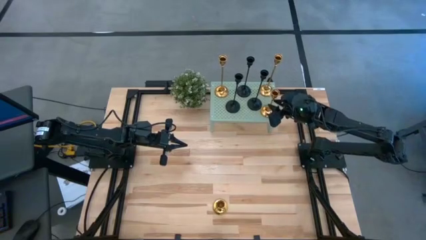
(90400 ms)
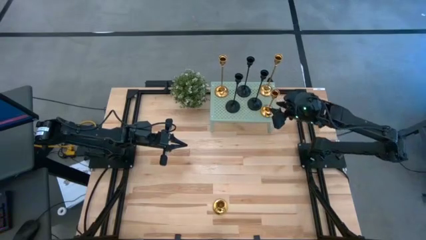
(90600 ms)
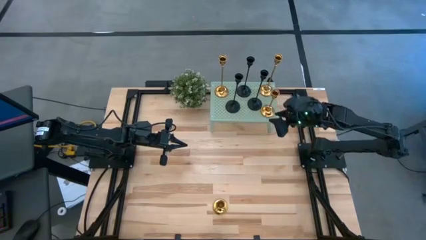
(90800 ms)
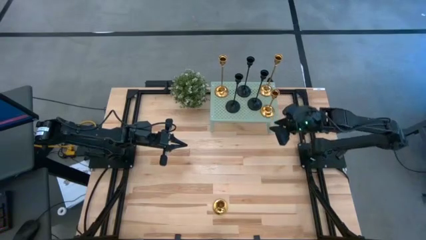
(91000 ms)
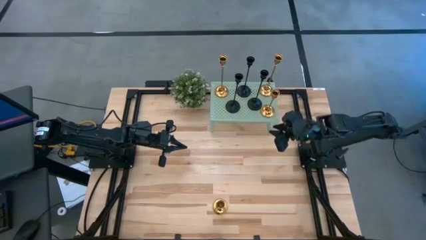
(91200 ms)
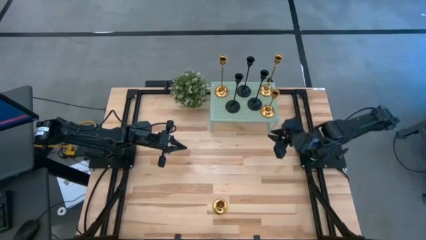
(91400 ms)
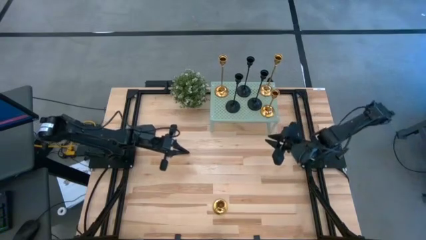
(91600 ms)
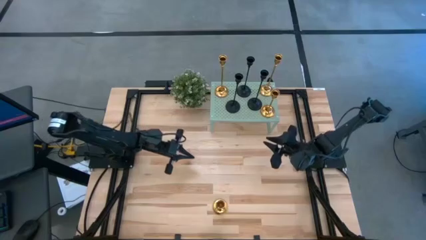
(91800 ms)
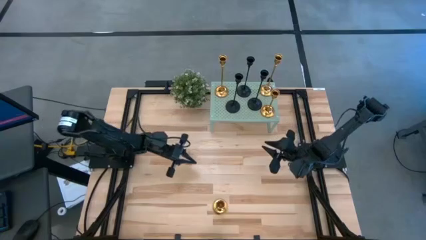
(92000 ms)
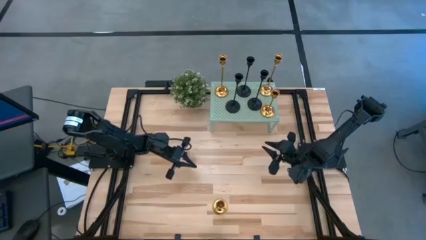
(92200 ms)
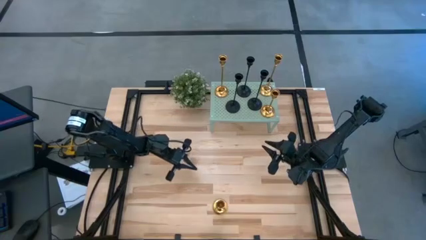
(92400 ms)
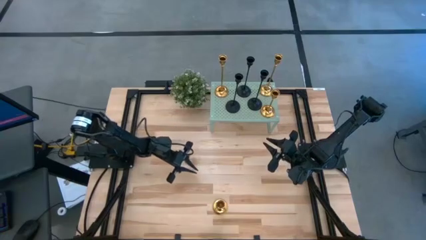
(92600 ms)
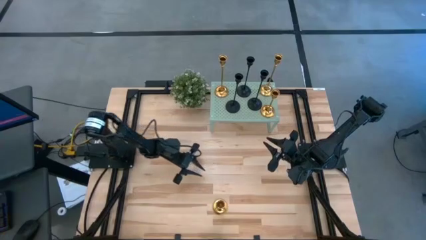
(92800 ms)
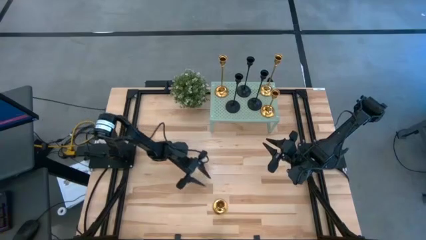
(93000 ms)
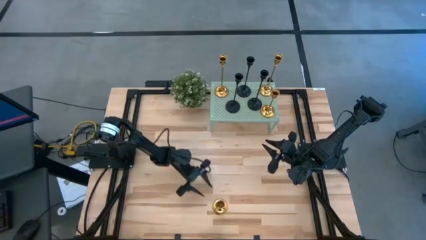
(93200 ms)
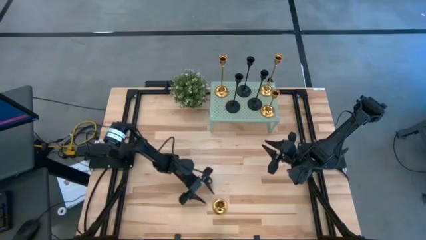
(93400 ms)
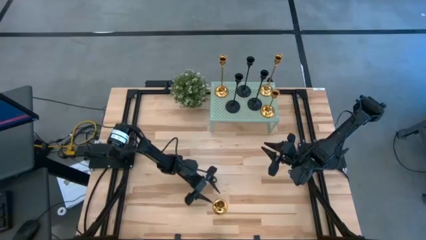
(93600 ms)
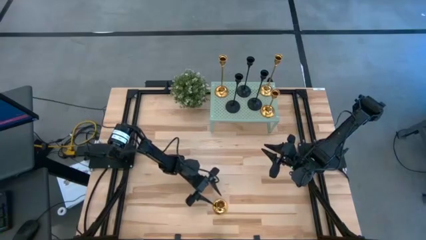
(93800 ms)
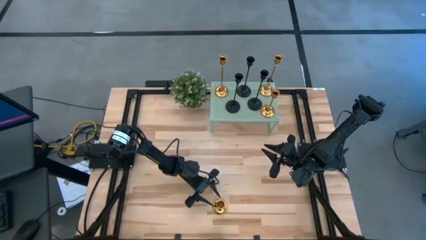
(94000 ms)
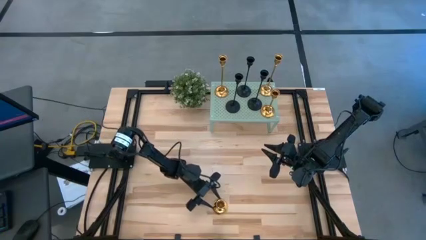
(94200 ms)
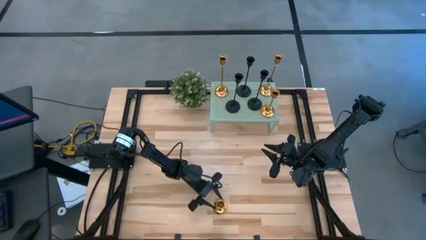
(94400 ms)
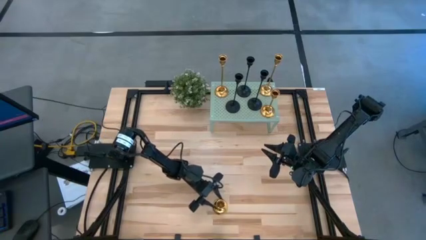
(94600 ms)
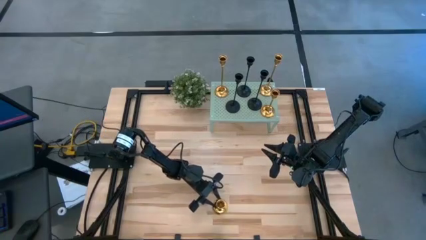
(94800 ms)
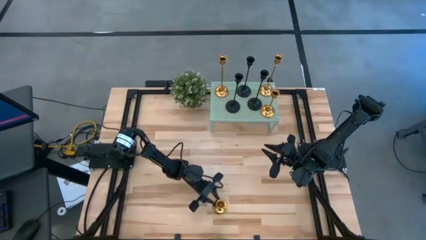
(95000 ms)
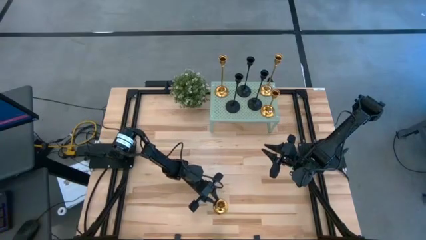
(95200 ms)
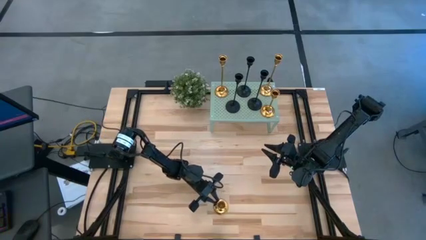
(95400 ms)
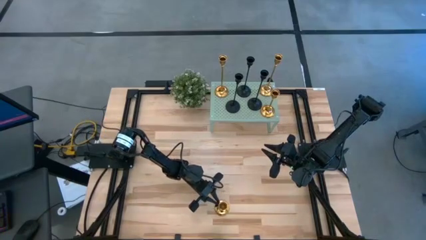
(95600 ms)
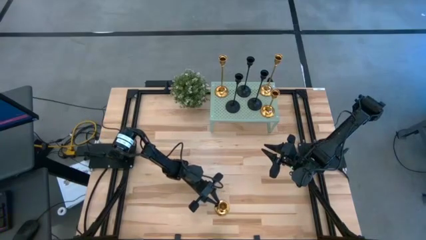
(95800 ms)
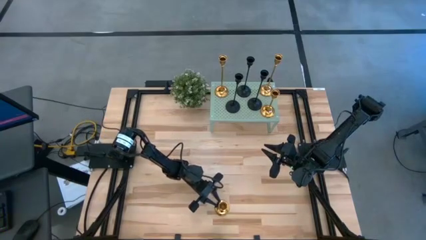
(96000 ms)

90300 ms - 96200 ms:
Task: Pick & Place candle stick holders
Put the gold candle holder on the shelf

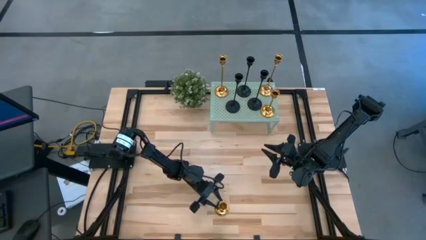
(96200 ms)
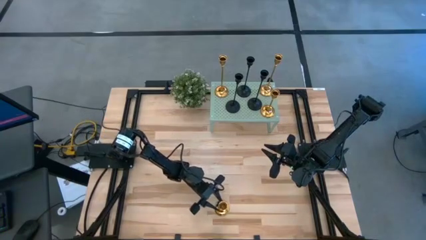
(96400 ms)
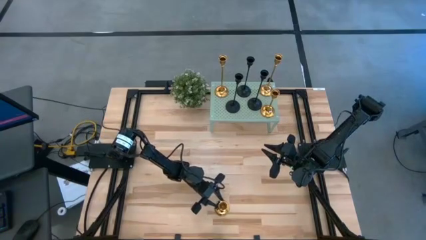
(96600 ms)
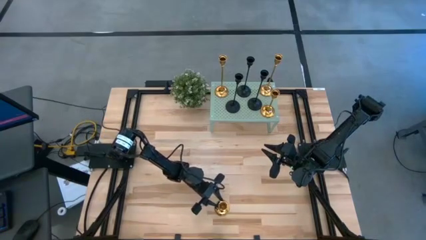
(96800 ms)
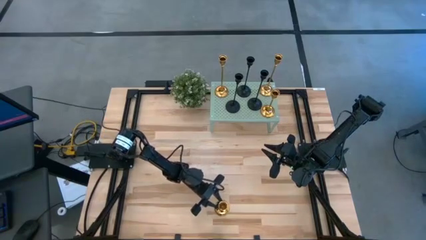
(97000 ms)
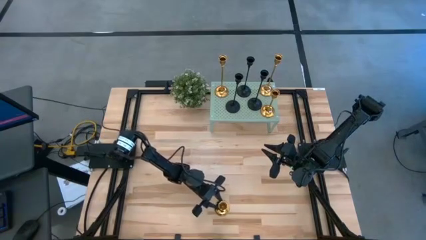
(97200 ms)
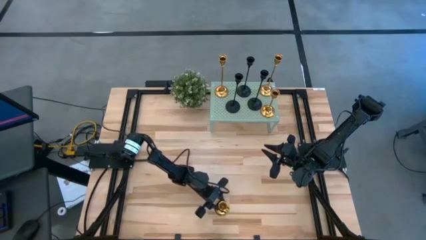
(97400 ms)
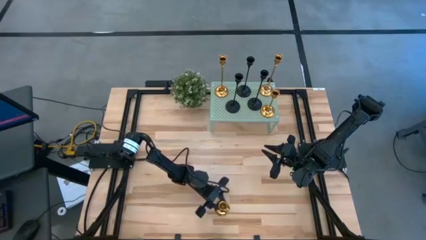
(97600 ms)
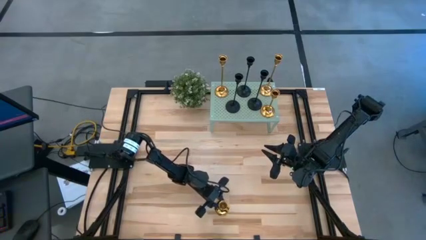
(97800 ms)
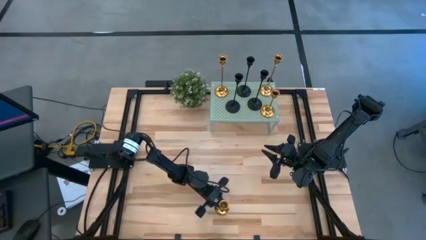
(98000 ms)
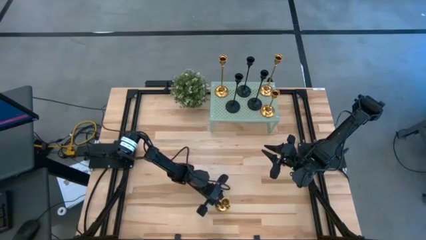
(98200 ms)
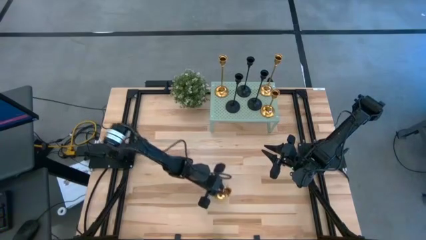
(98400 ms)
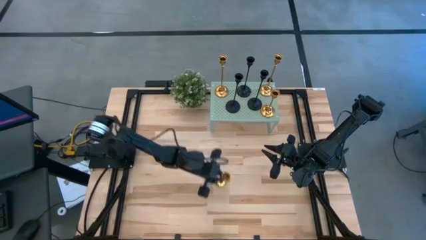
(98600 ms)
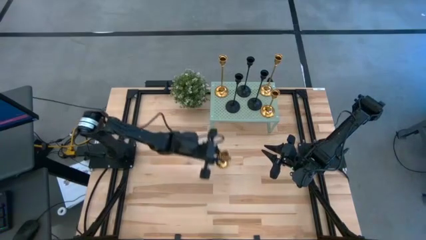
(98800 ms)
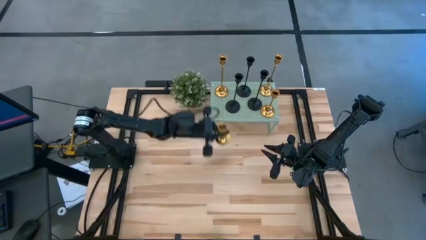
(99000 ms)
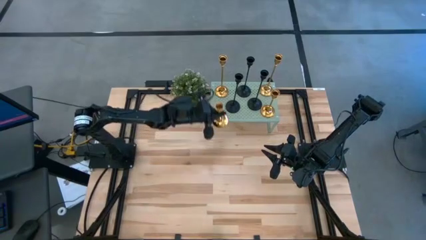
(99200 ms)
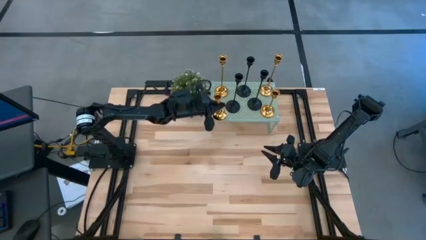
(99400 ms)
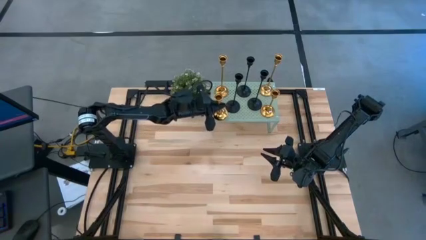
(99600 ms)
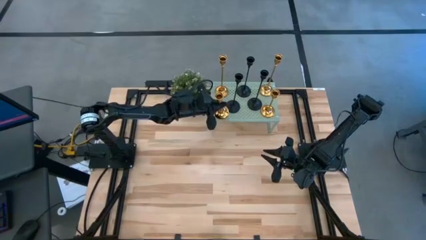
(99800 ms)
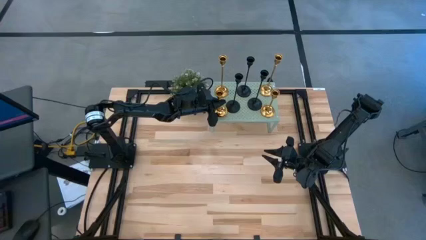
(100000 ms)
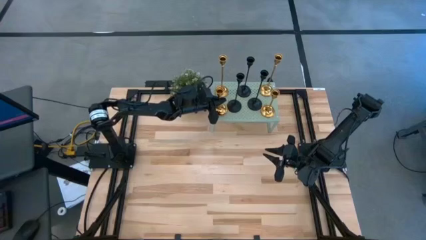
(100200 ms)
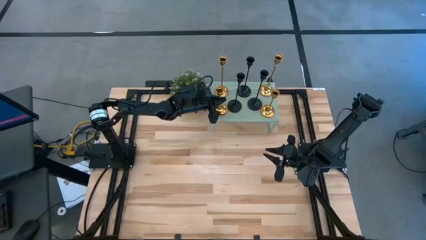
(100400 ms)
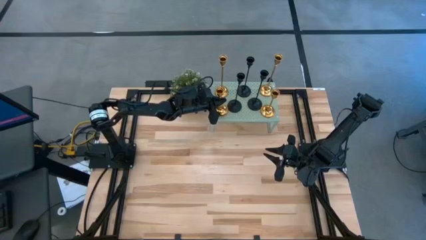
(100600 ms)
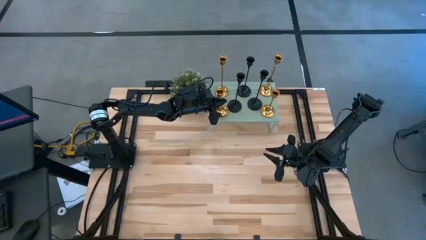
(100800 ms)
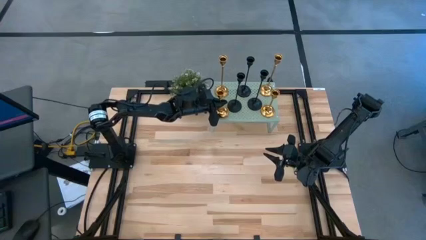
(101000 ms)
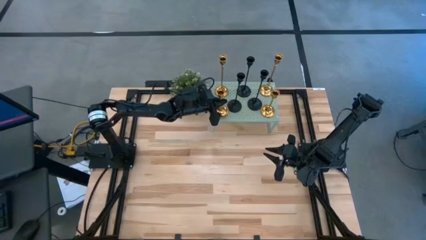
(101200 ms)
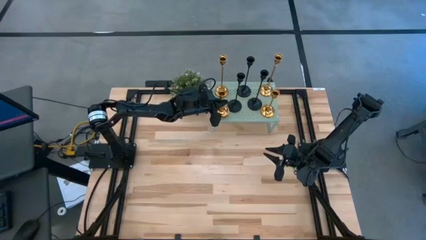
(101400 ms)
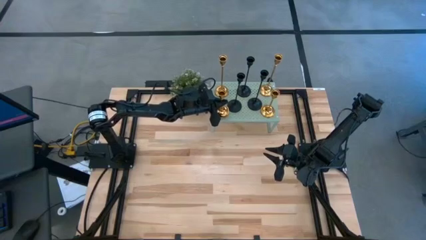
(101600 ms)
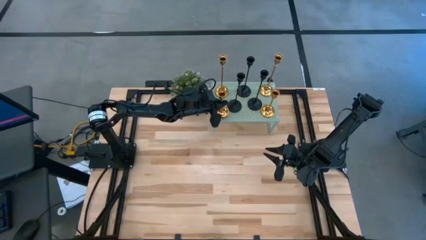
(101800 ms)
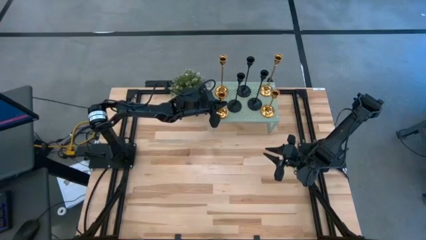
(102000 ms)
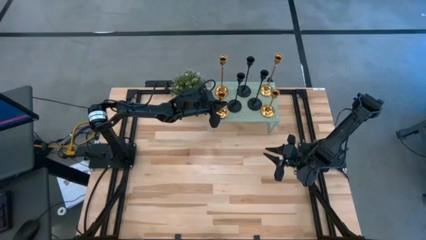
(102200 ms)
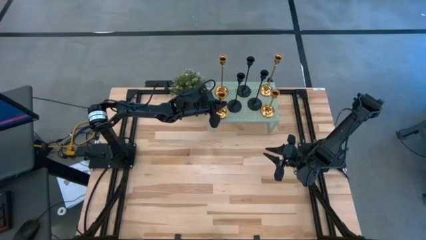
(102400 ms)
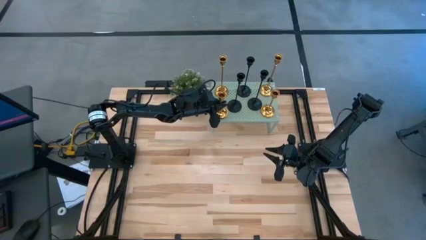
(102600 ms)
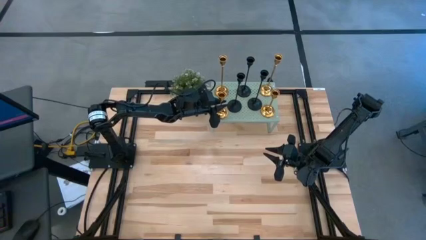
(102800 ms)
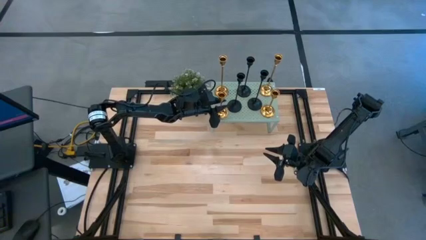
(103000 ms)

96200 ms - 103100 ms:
Put the gold candle holder on the shelf

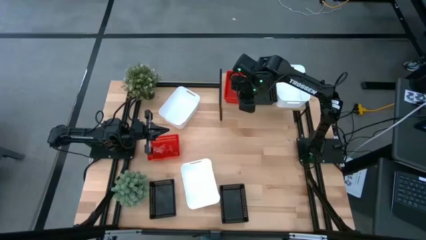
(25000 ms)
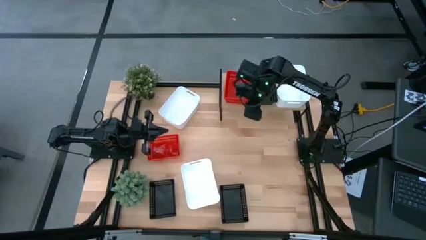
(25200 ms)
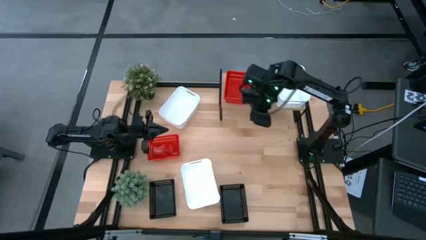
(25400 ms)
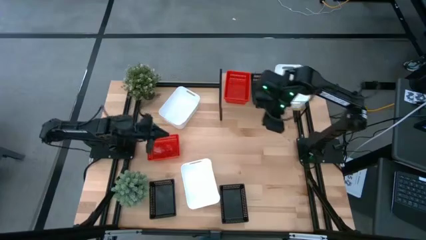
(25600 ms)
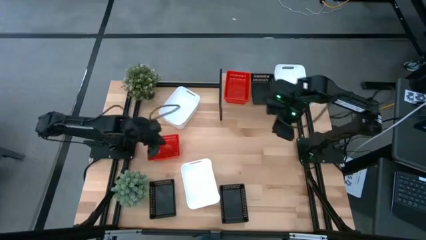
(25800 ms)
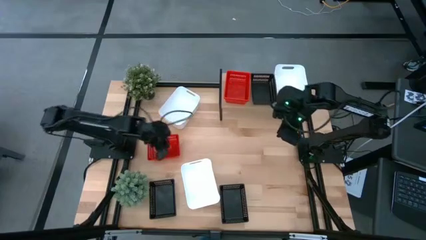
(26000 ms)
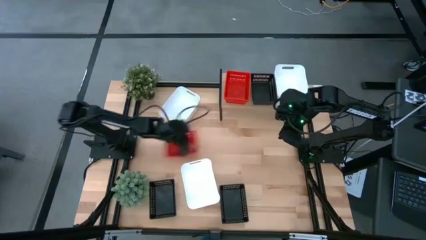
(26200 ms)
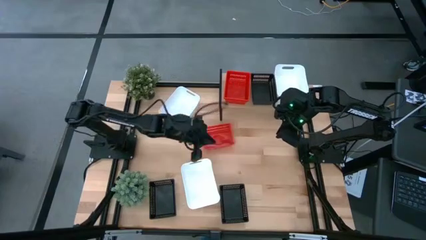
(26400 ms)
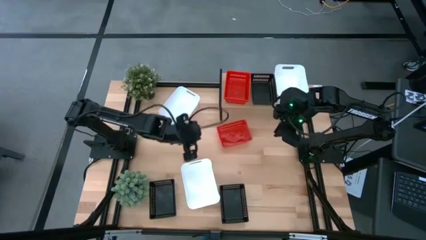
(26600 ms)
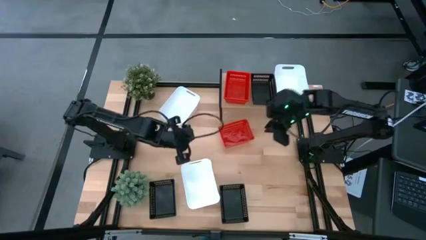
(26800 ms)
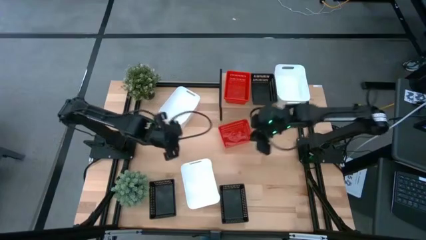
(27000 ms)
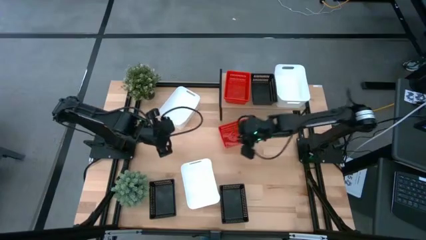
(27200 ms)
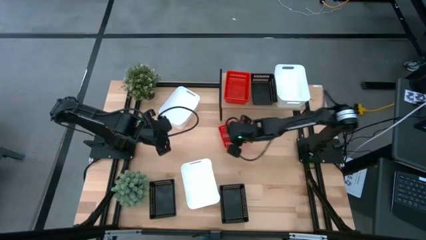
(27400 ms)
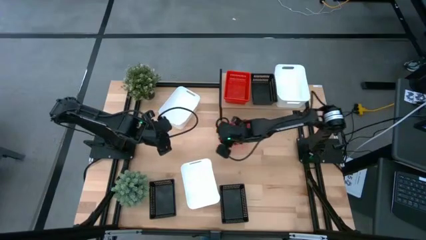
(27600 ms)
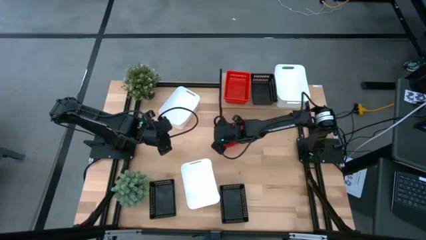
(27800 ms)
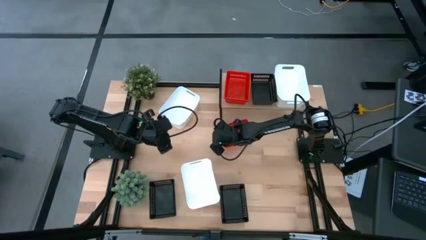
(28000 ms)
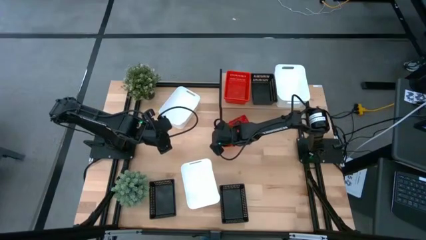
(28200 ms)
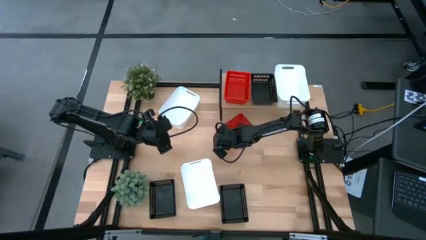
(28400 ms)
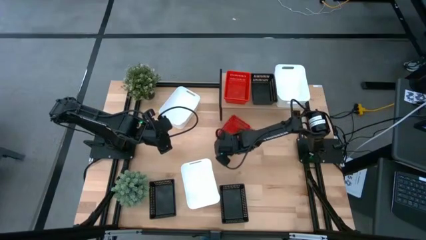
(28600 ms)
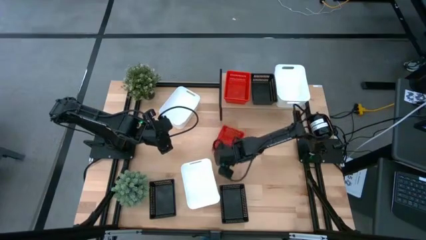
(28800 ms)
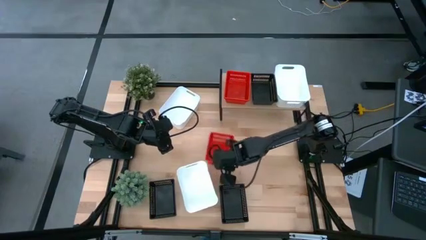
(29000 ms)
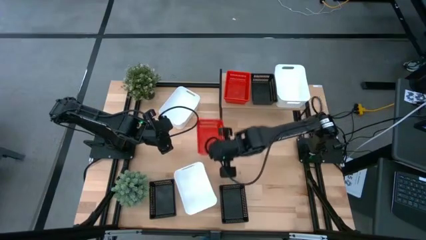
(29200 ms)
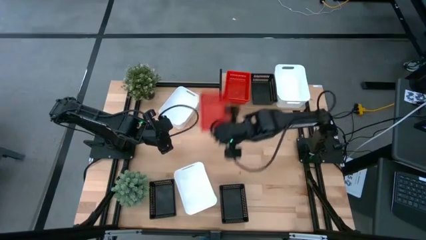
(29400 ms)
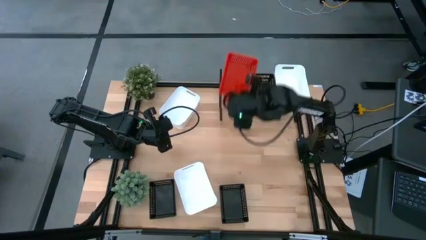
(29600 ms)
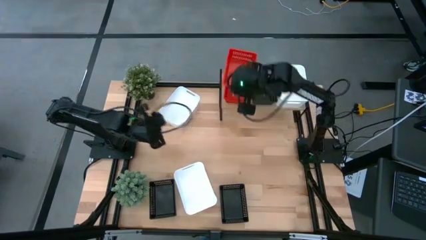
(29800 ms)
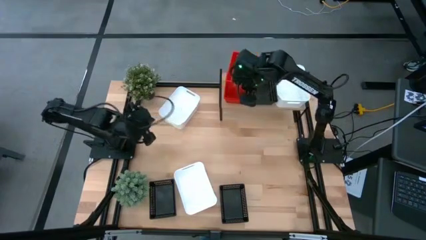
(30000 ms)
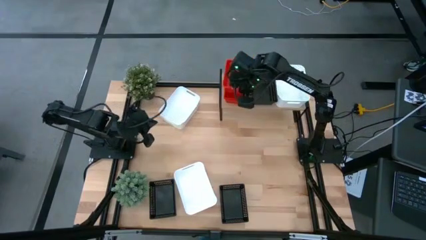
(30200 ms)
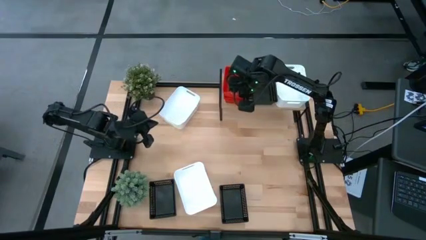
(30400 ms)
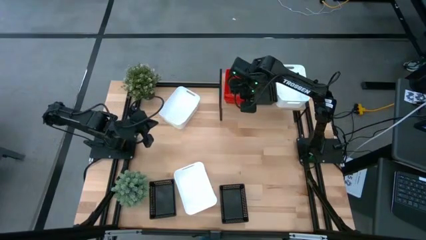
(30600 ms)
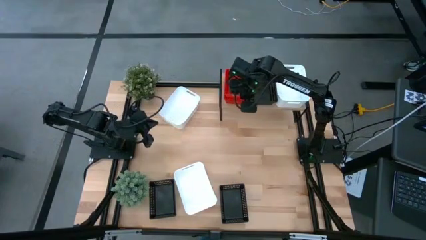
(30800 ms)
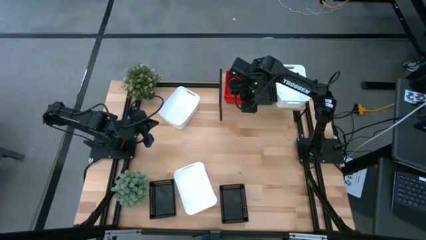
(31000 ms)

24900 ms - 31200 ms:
Task: Stack baskets on shelf by color
Stack the red bin on the top of the red bins on the shelf
